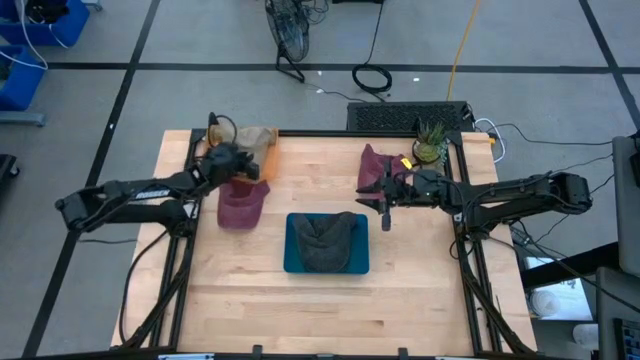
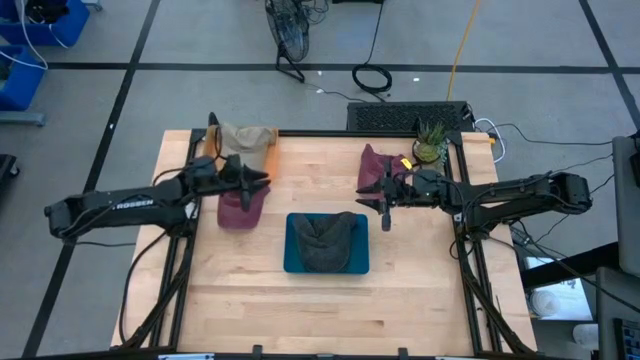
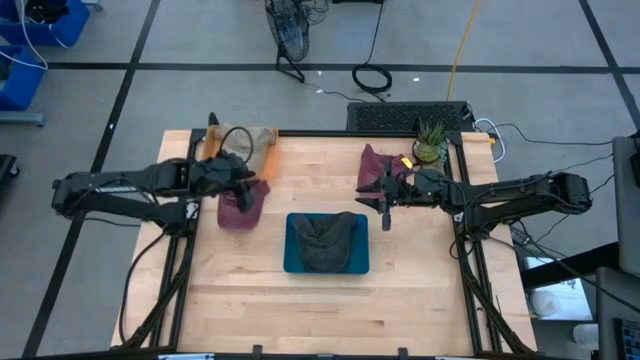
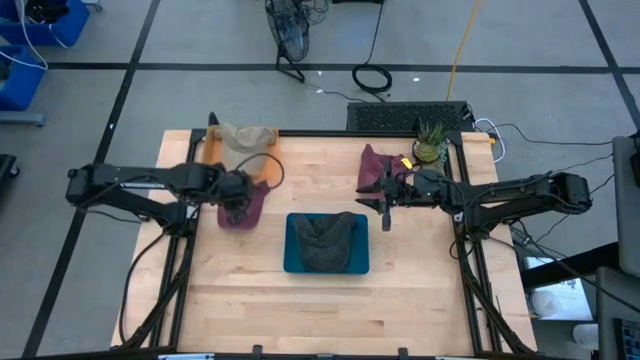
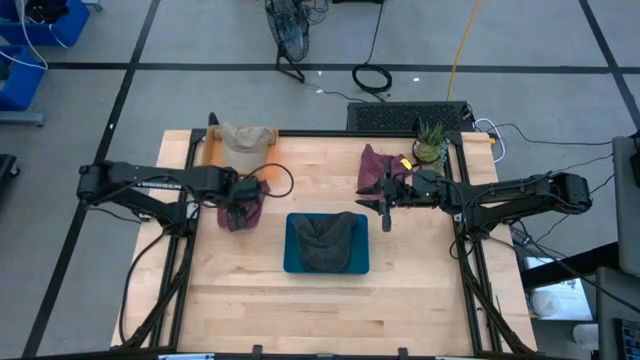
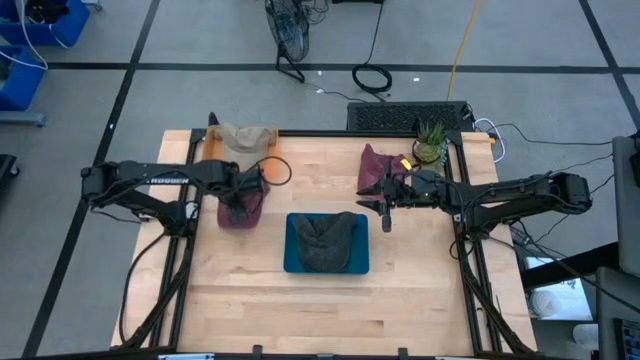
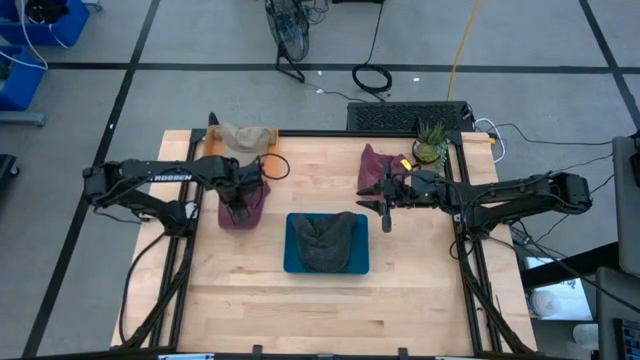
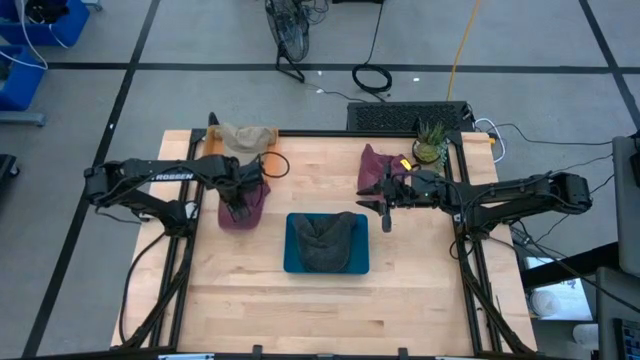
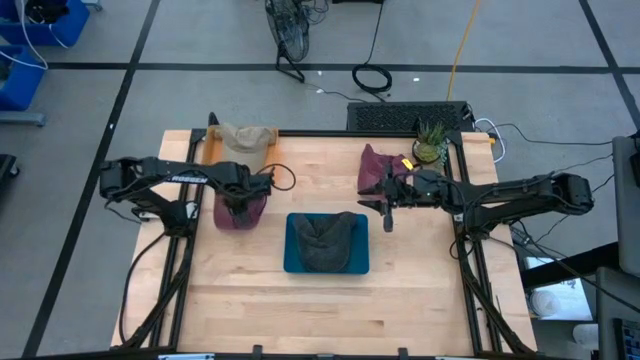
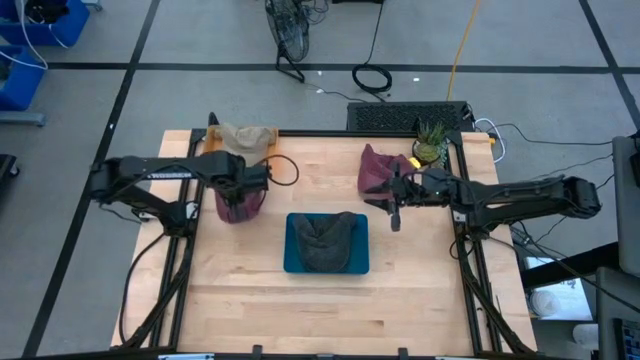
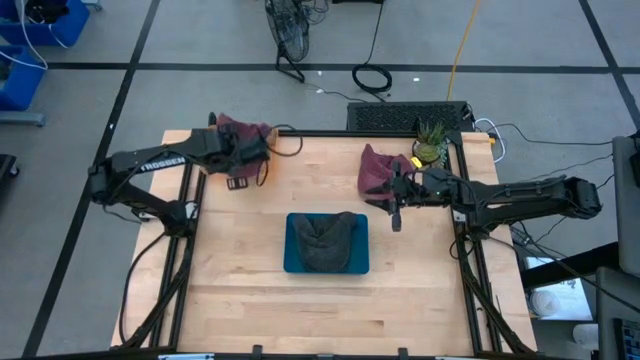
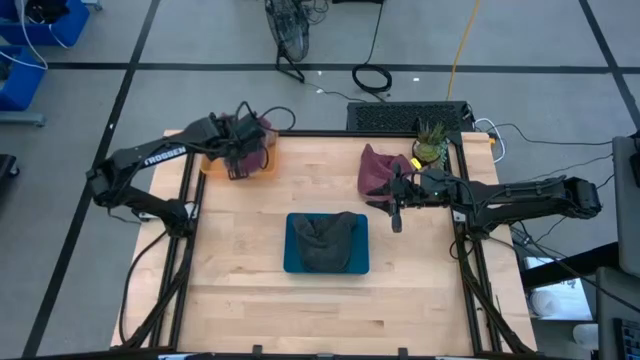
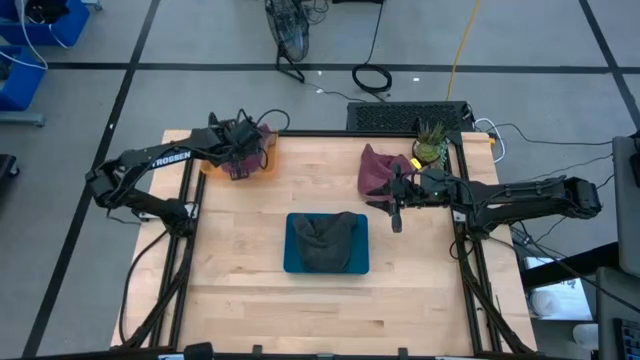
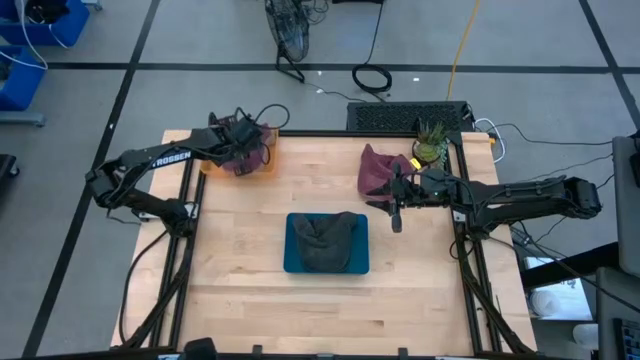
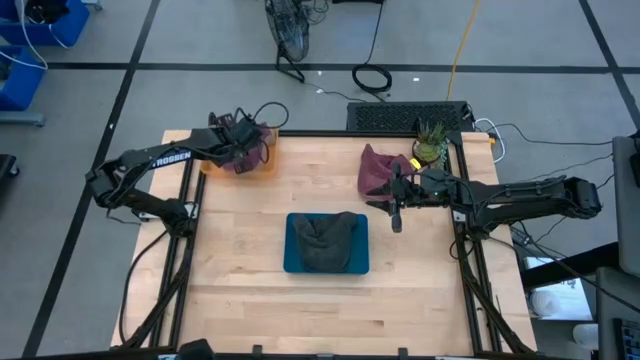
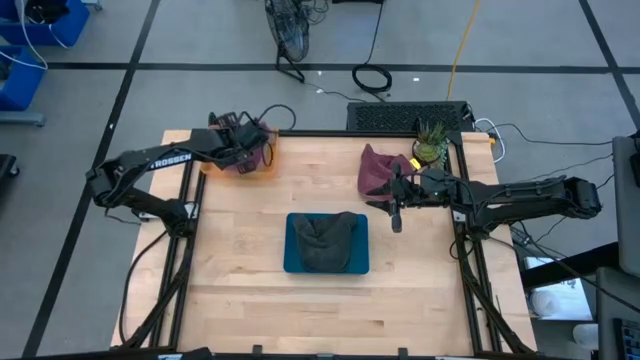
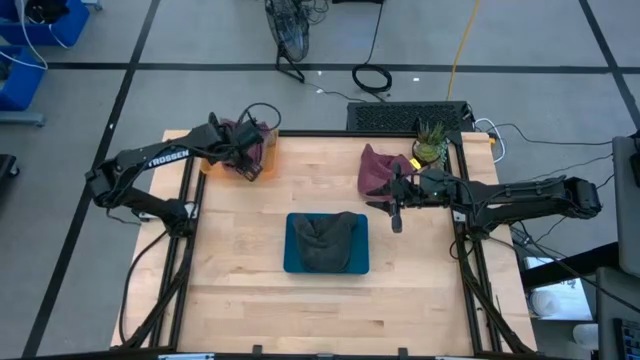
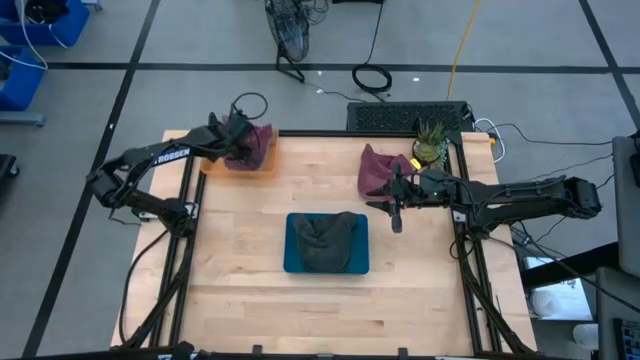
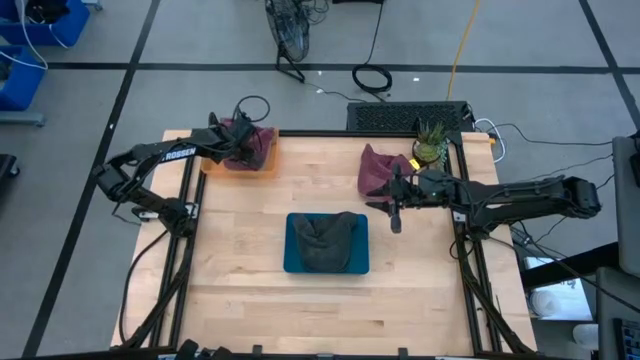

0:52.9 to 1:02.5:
Task: Pick & Place hat
Put the red cap into the orange bin

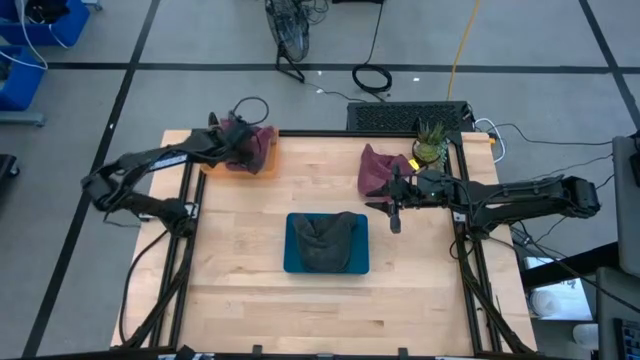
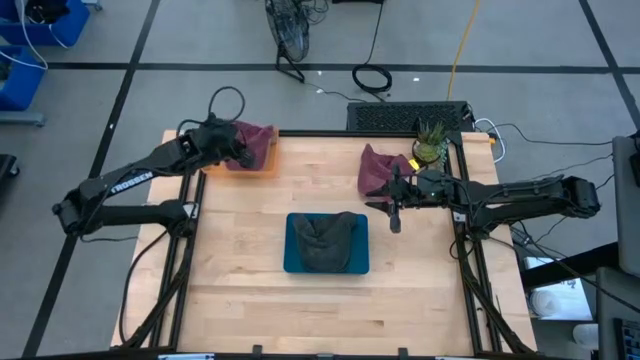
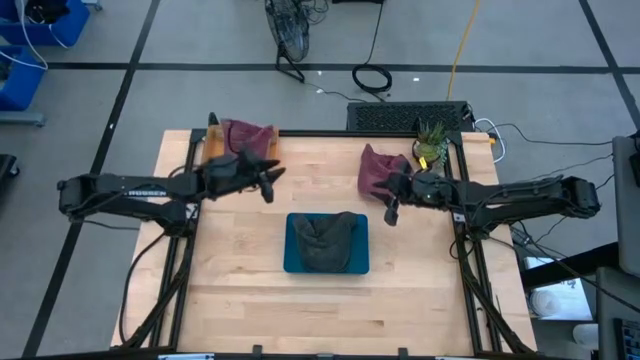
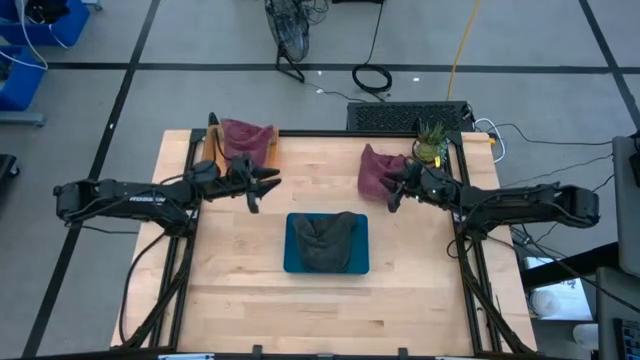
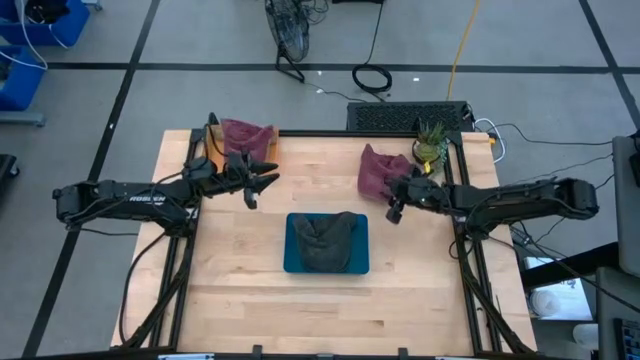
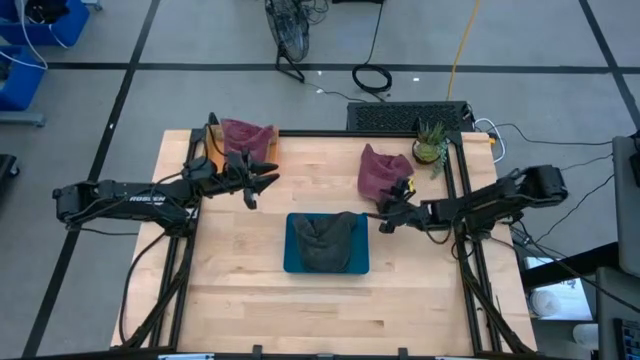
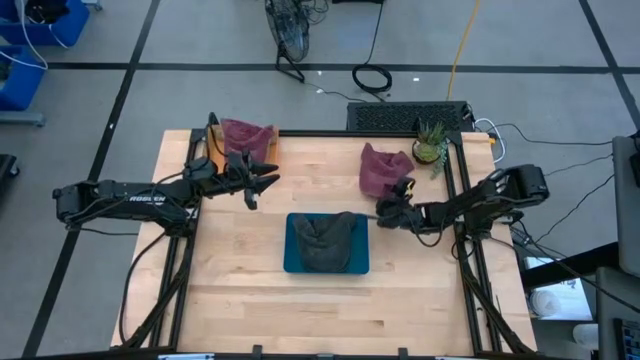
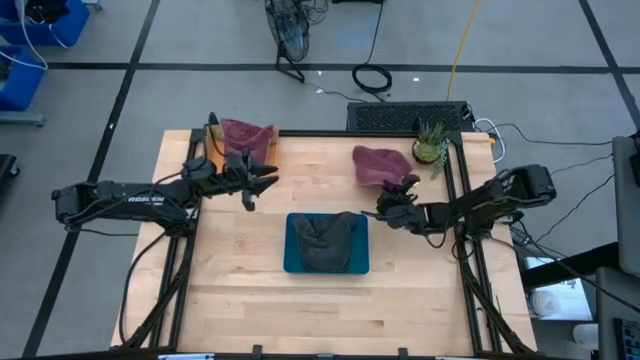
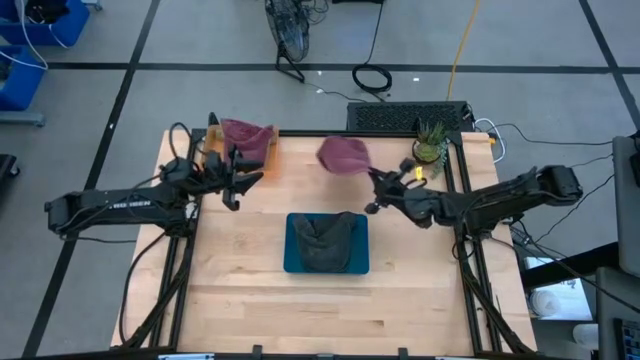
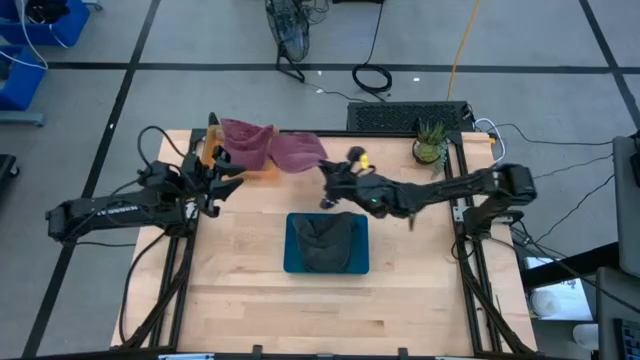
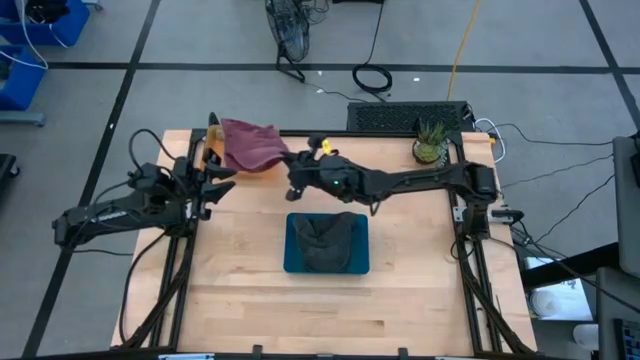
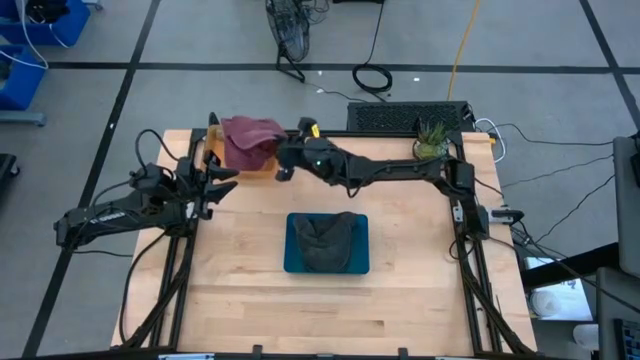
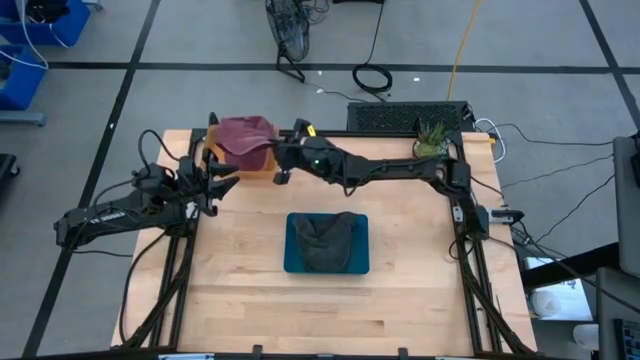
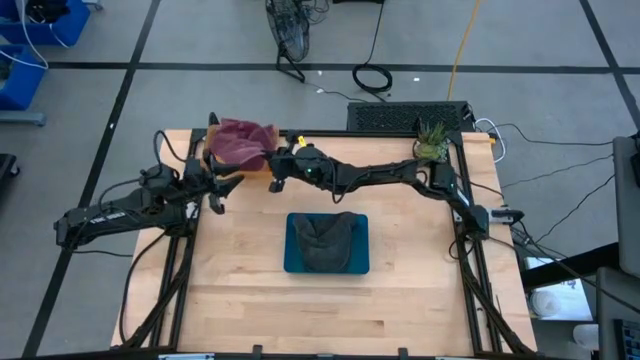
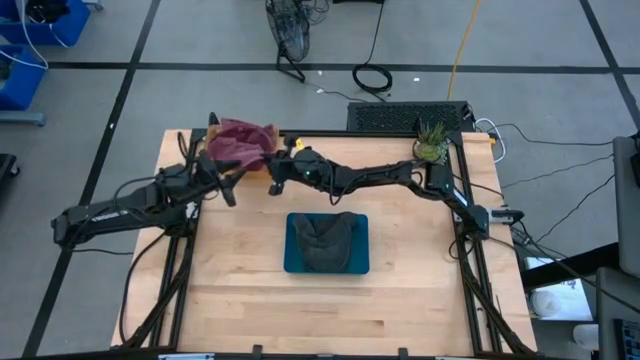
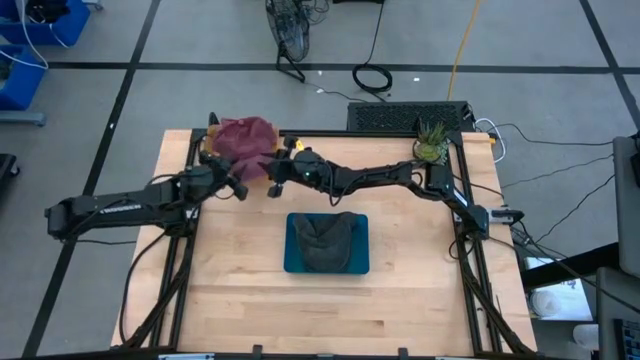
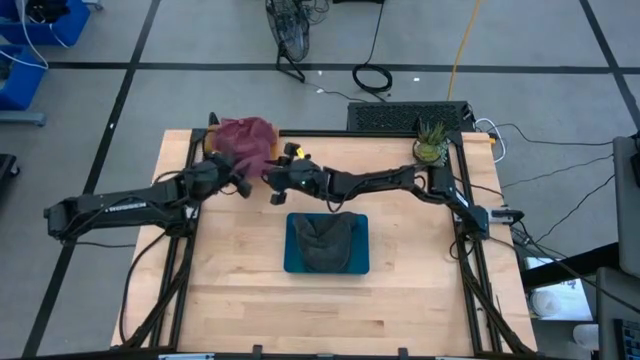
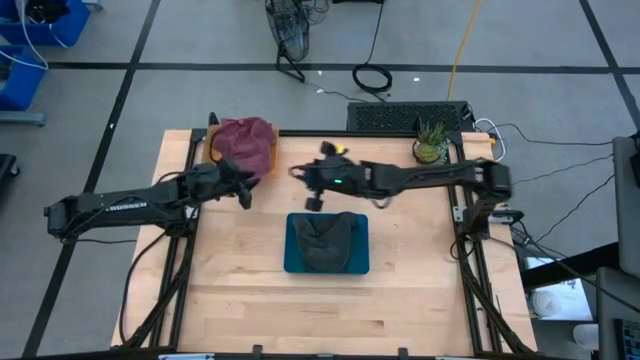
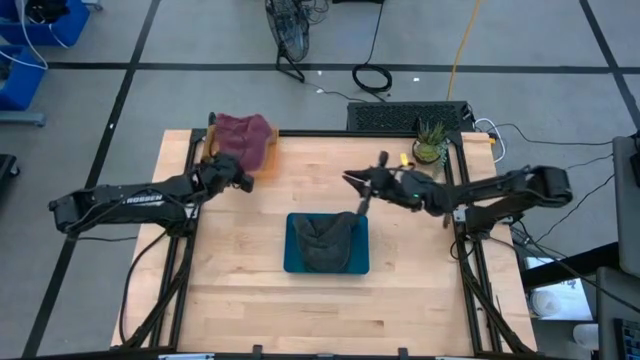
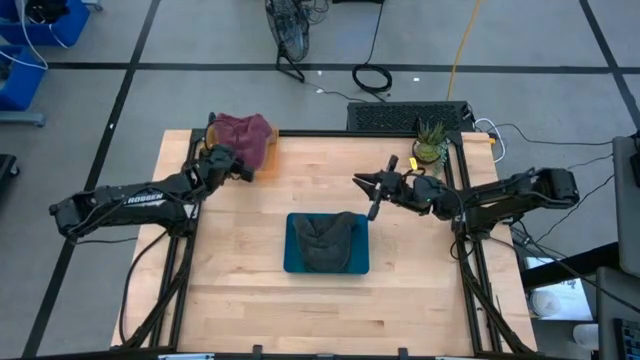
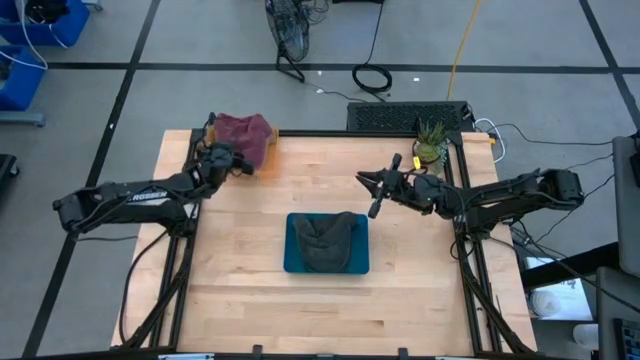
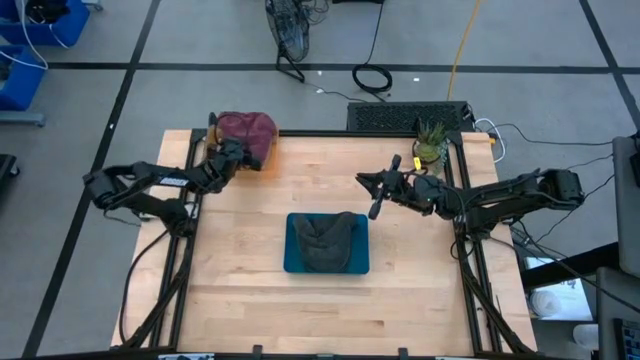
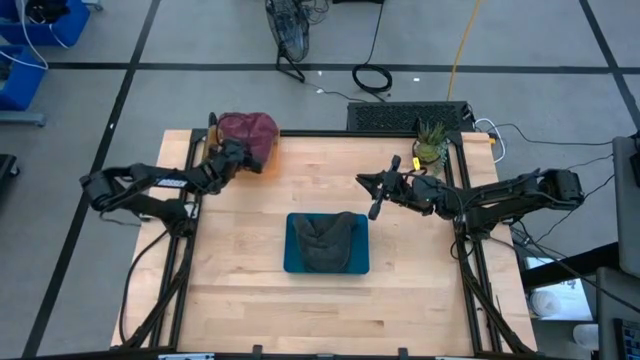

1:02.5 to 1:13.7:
Put the red cap into the orange bin

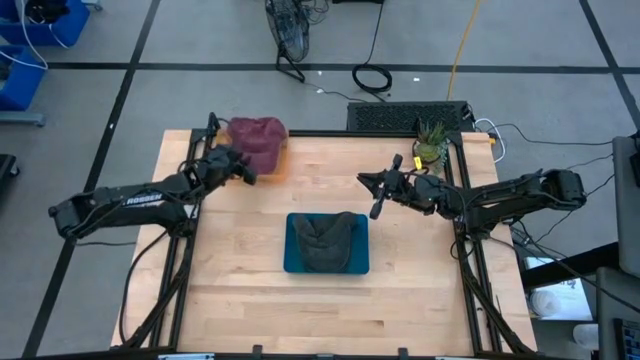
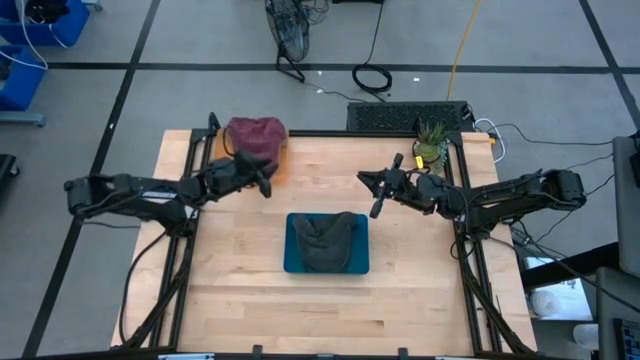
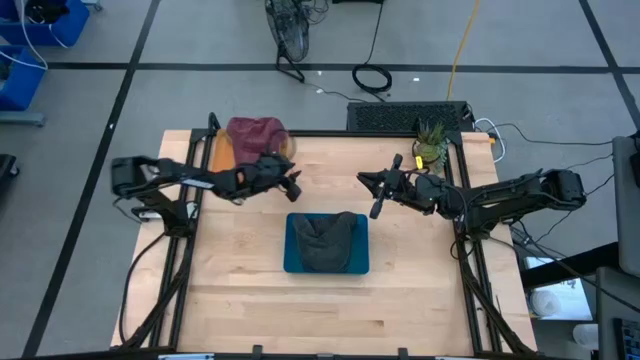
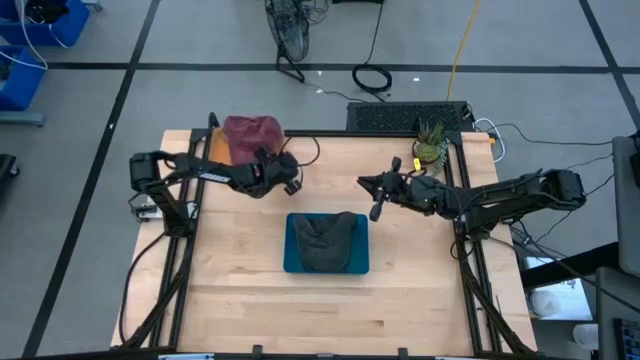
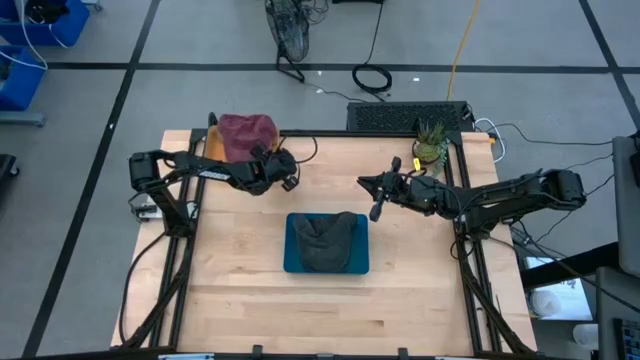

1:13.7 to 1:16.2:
Adjust the orange bin
